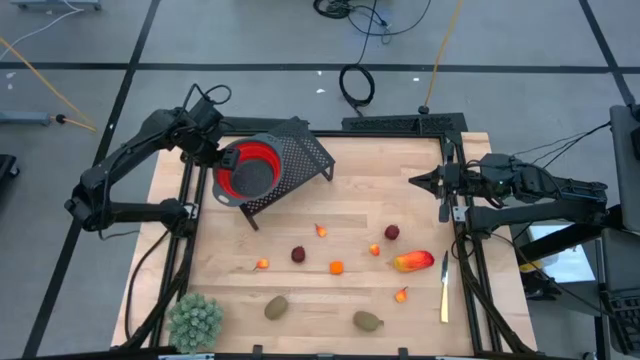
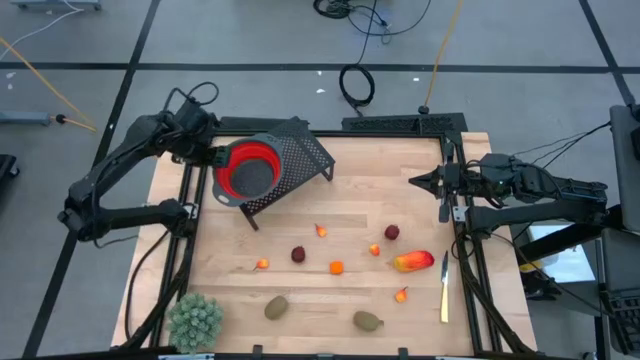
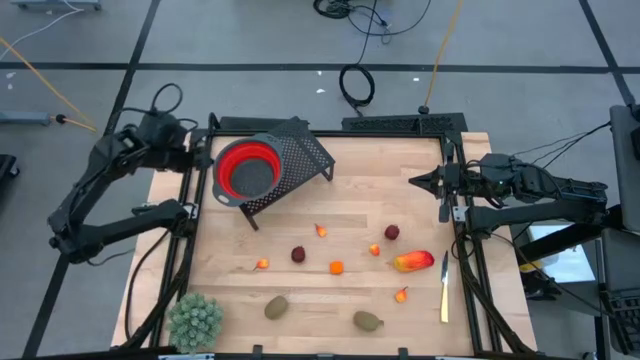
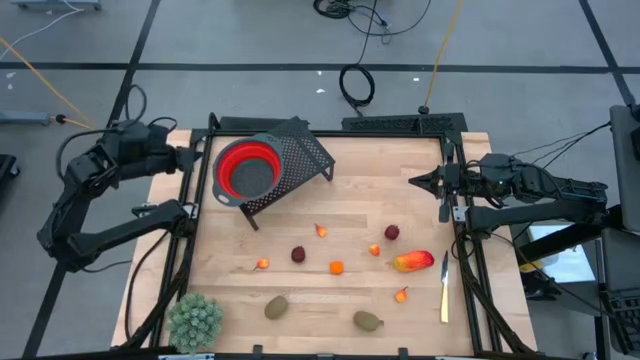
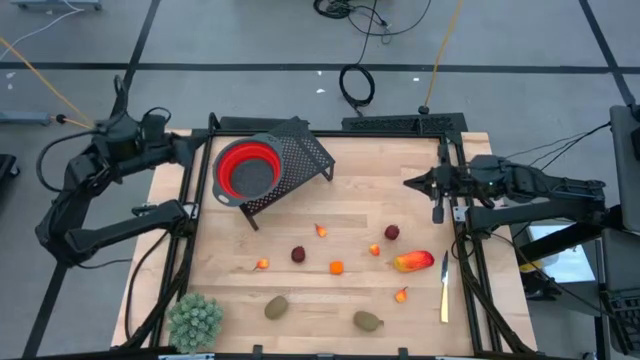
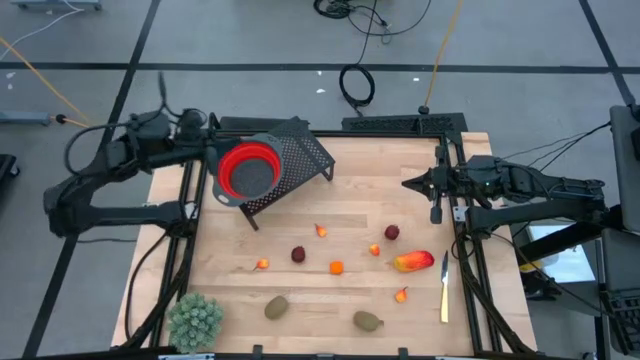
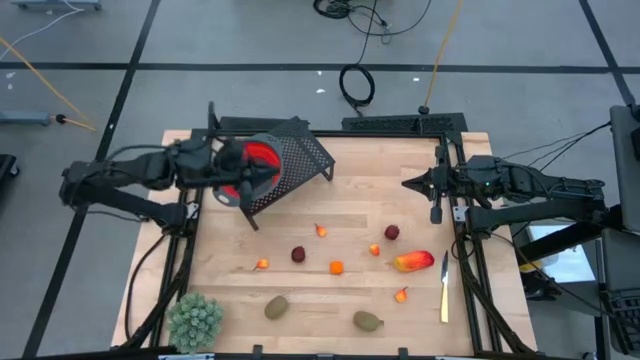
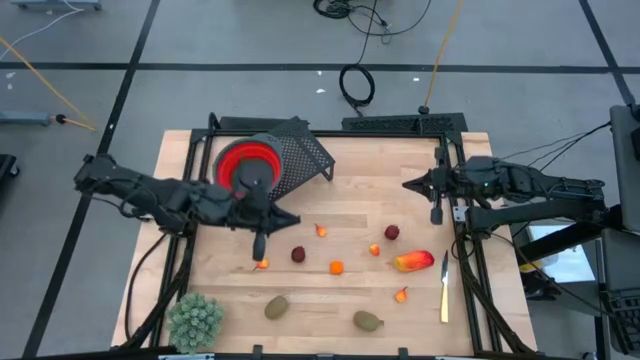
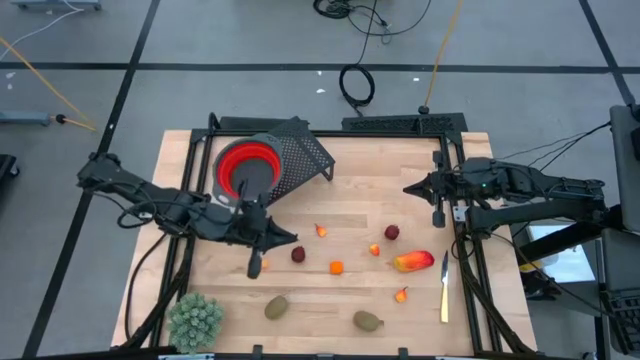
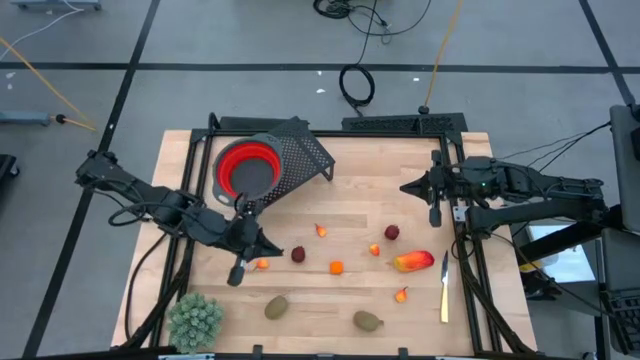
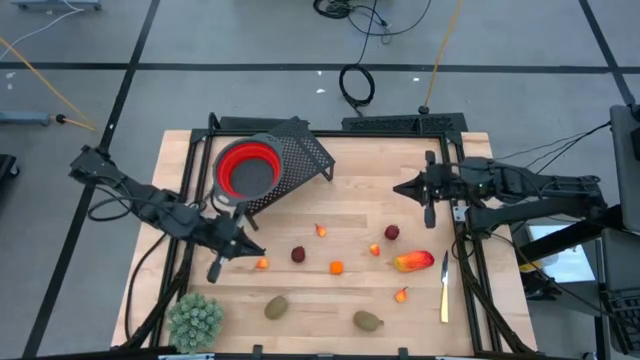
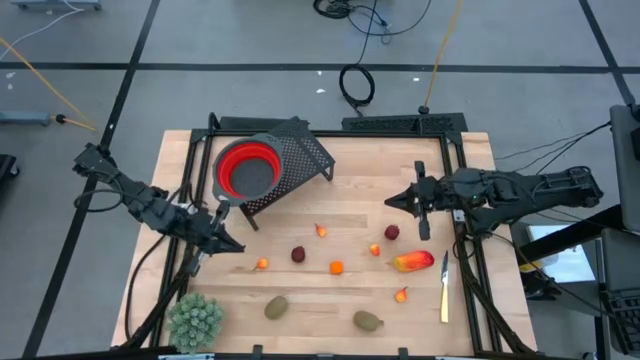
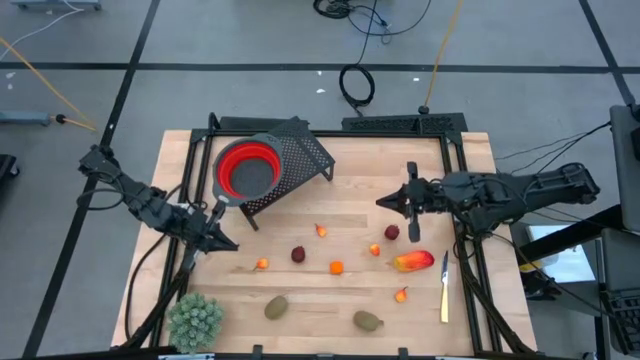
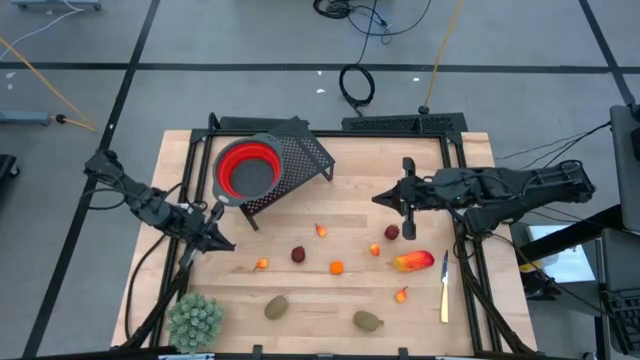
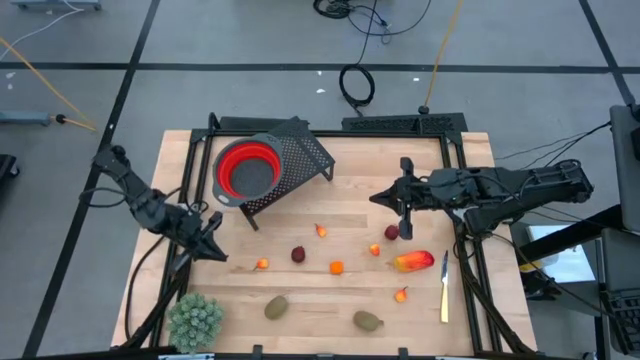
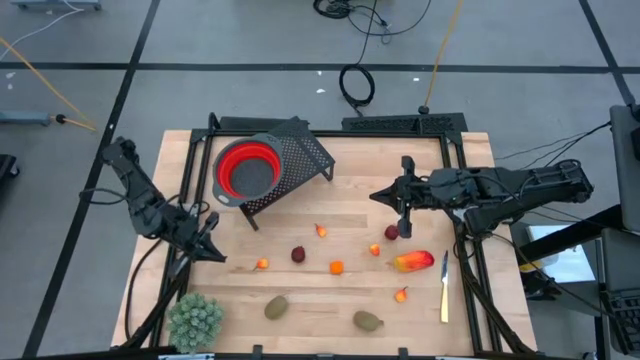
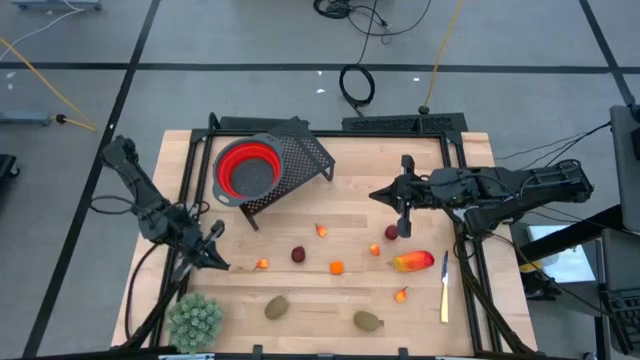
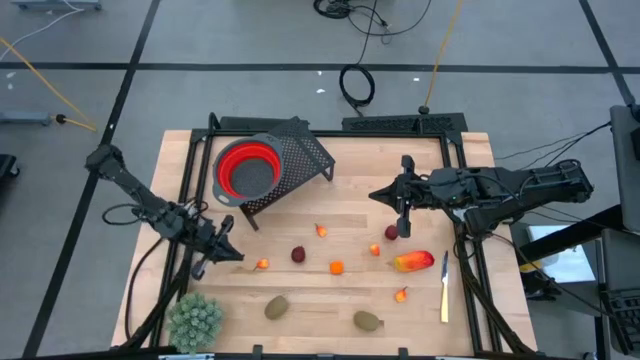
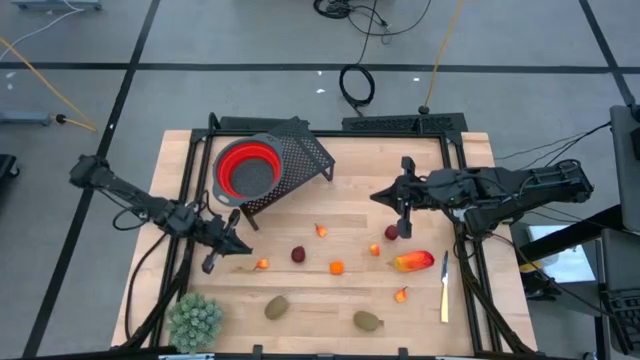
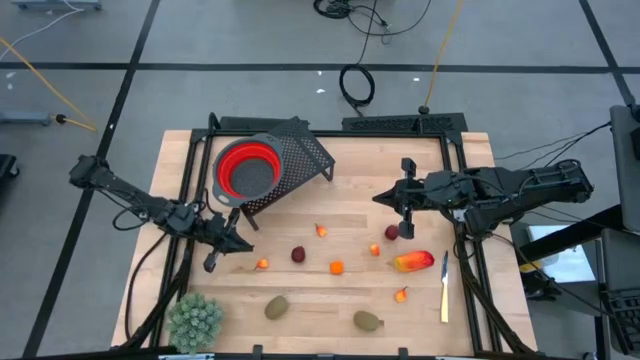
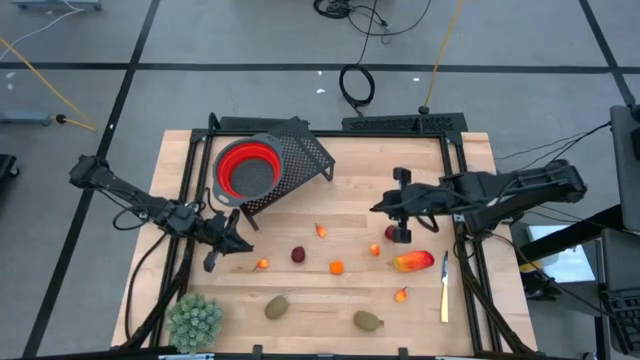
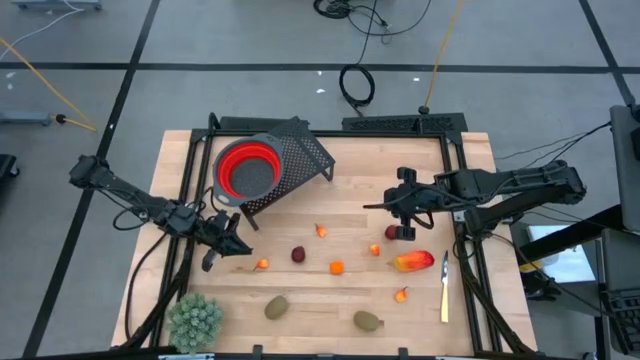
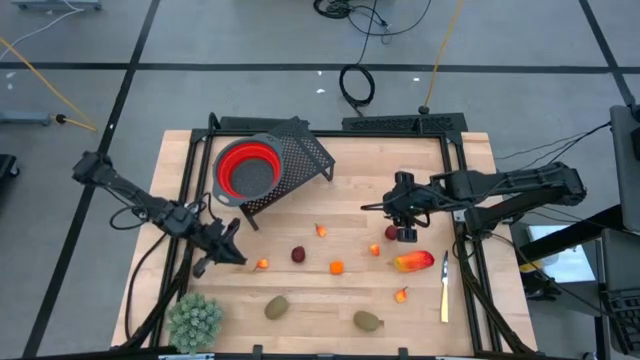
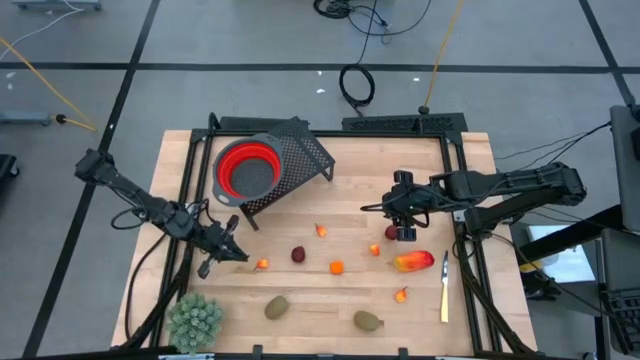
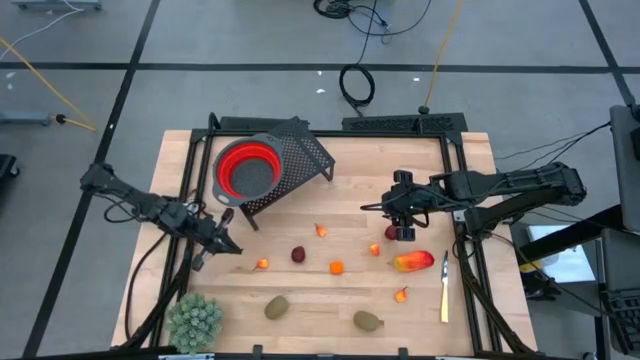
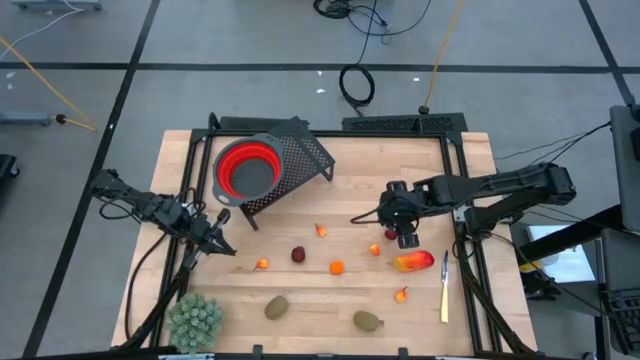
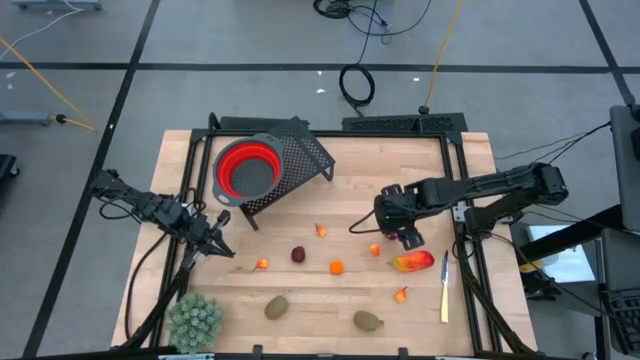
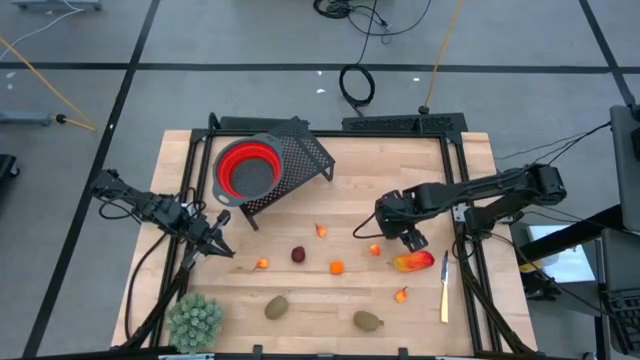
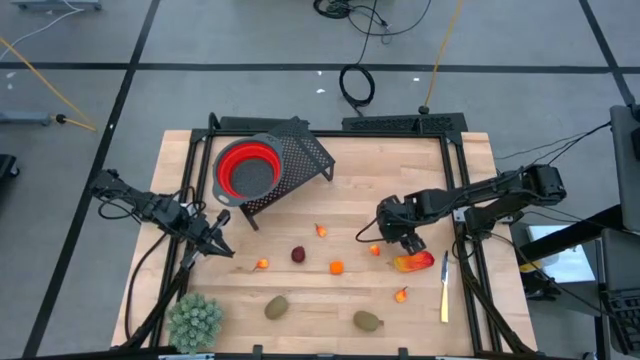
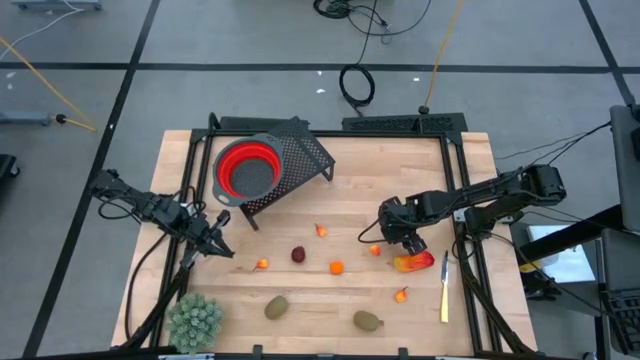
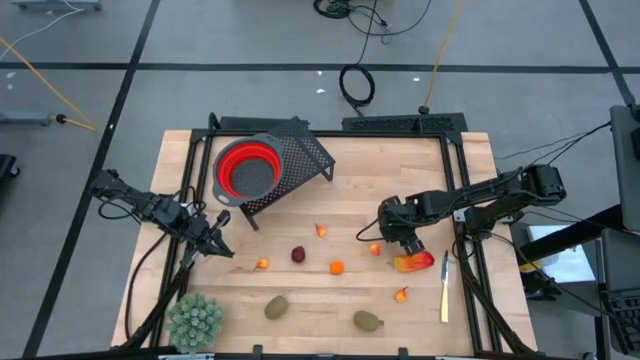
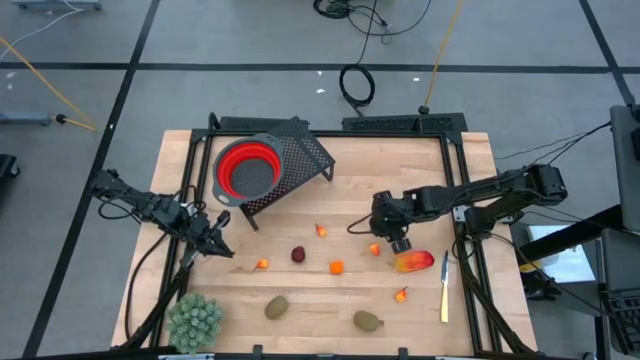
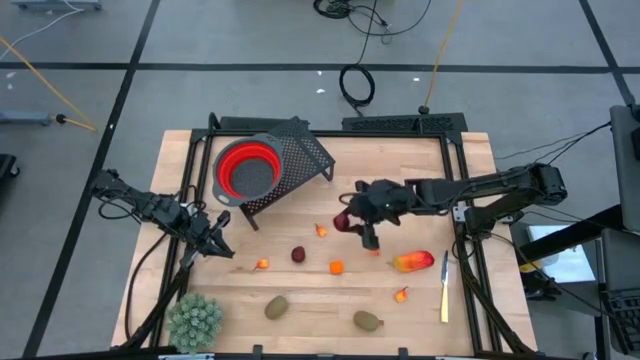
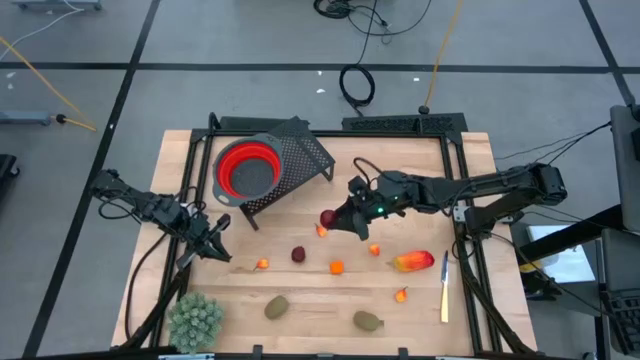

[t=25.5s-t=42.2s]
Task: Pick & Place Fruit
Put the pomegranate into the red strainer bowl on the shelf

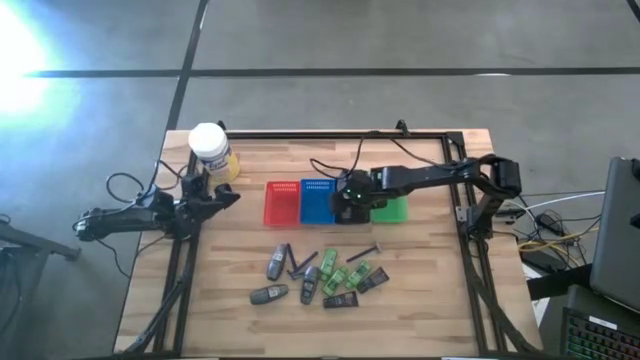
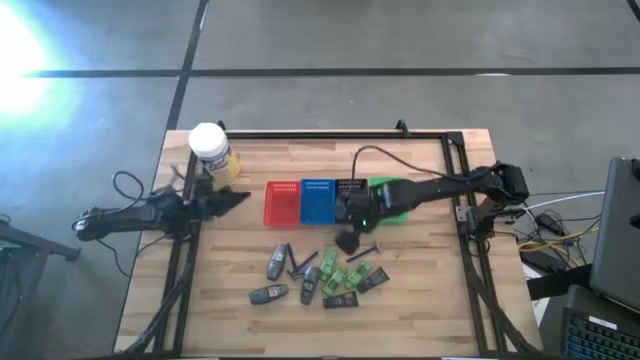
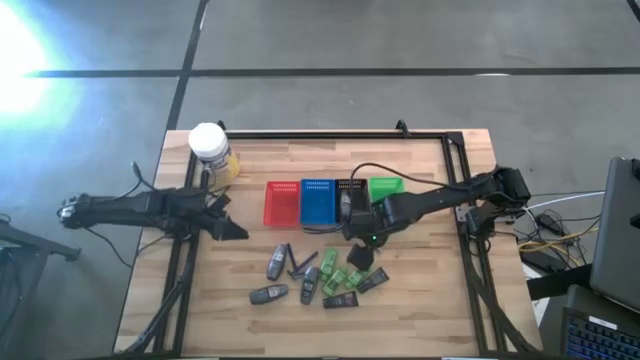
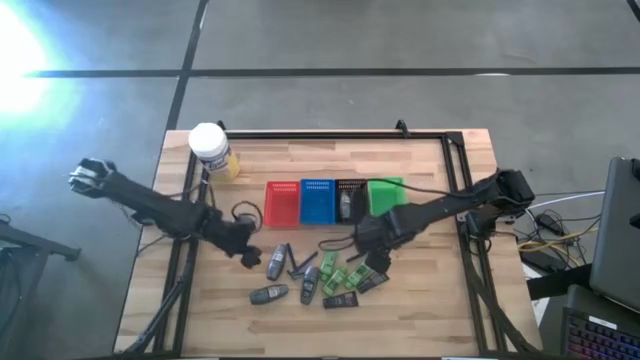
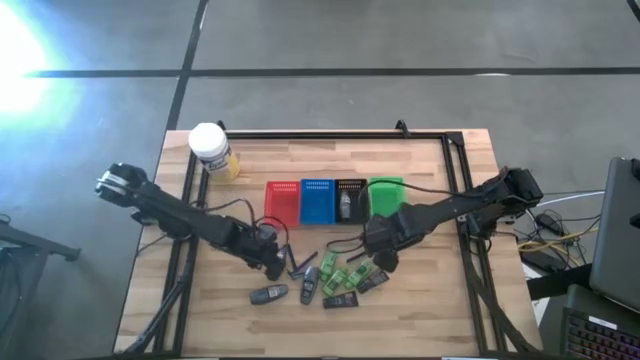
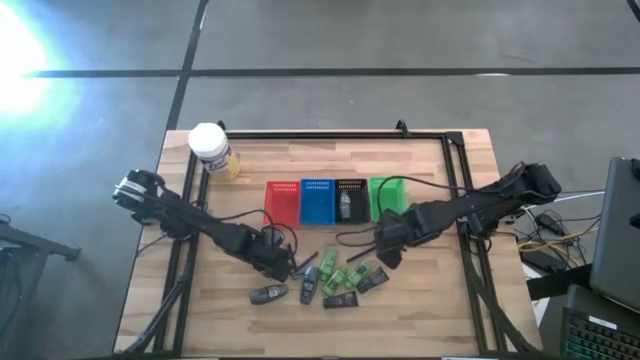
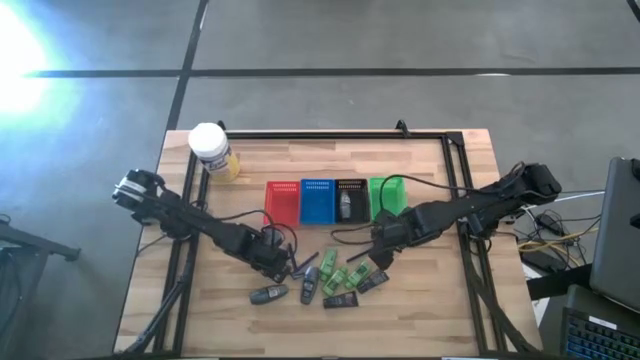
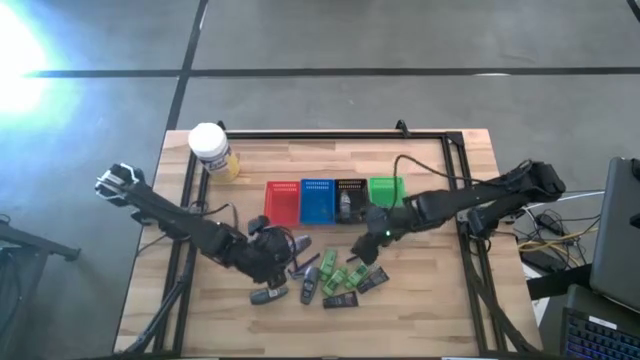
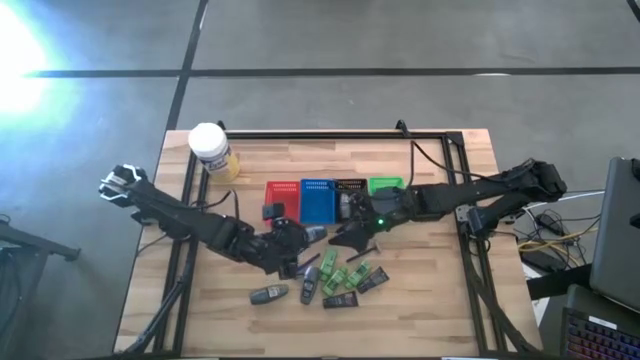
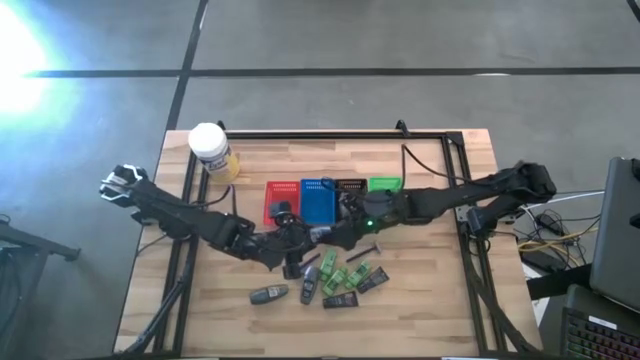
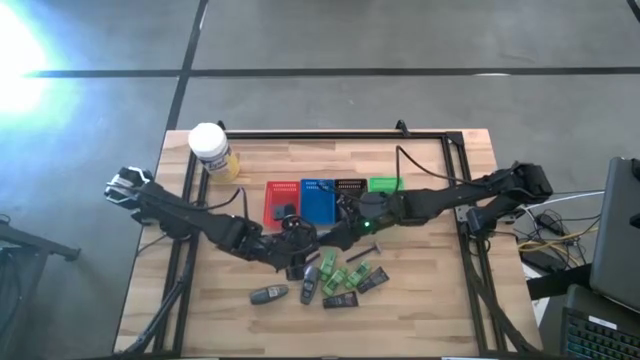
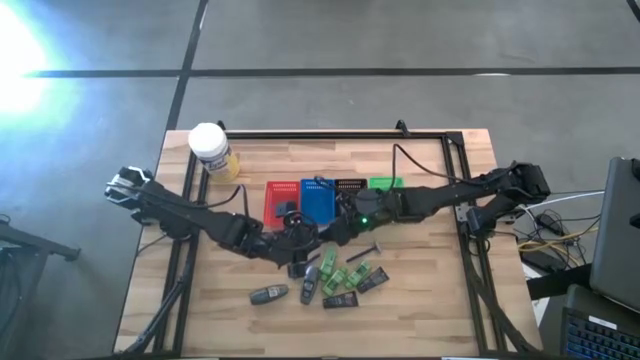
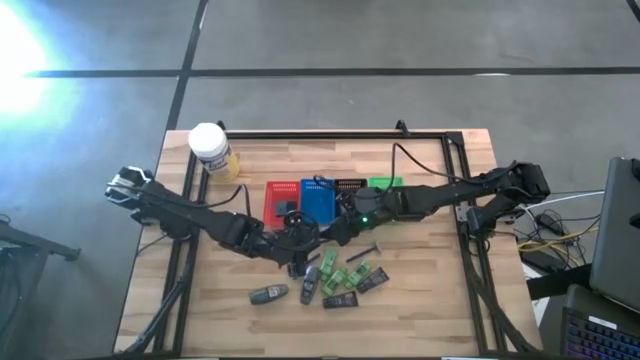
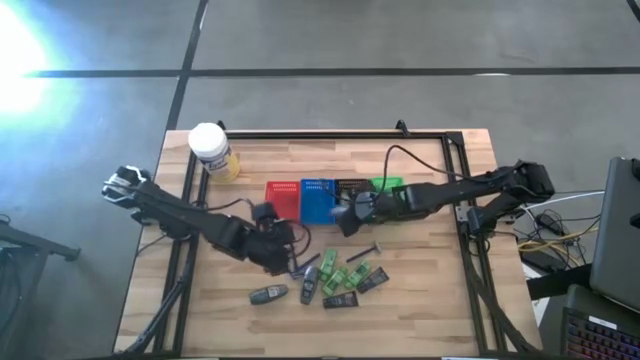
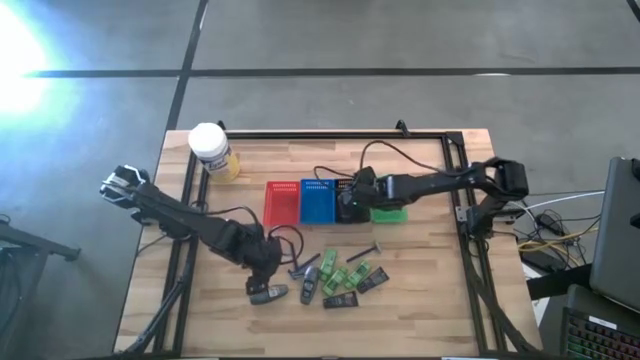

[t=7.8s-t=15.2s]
Task: Pick & Place Travel size toiletries
Put the gray deodorant into the black bin
